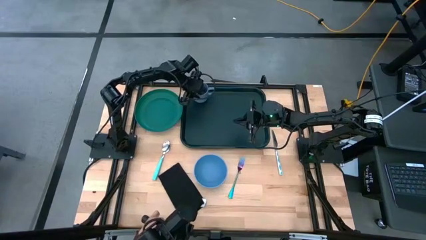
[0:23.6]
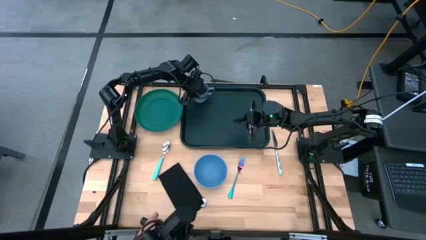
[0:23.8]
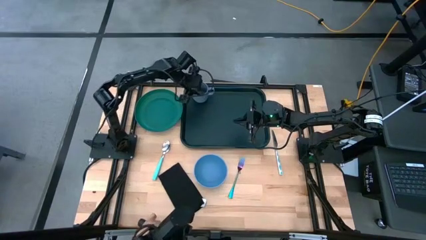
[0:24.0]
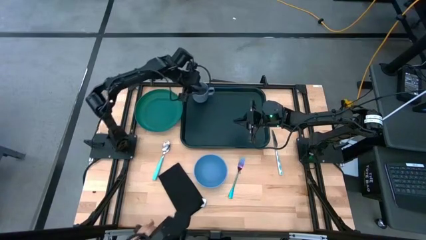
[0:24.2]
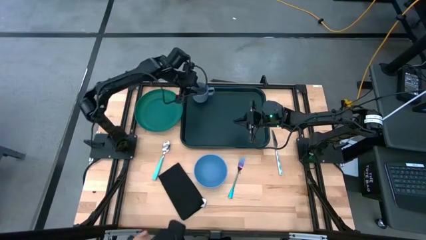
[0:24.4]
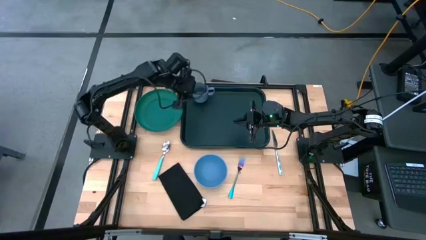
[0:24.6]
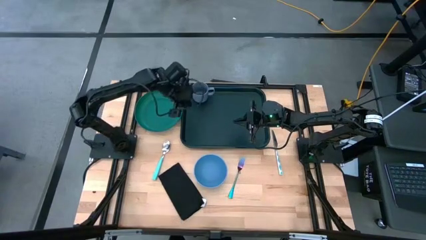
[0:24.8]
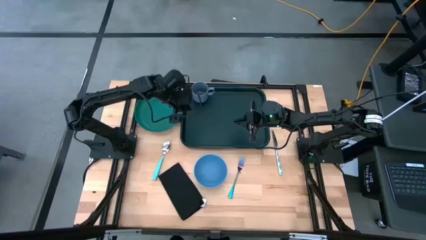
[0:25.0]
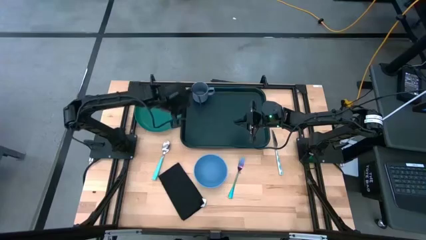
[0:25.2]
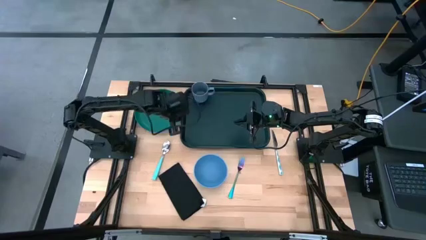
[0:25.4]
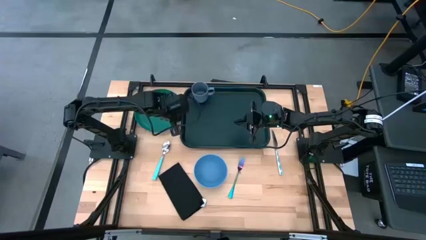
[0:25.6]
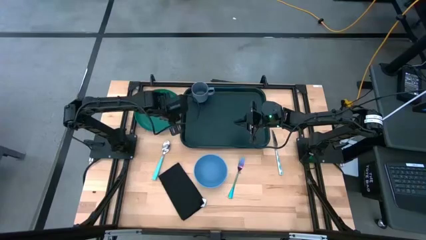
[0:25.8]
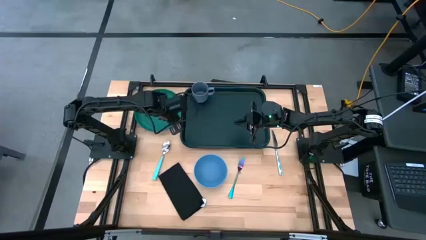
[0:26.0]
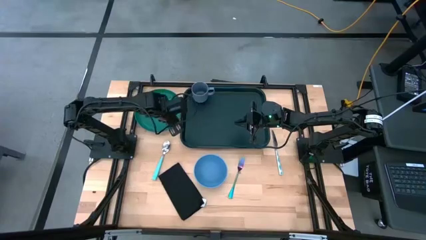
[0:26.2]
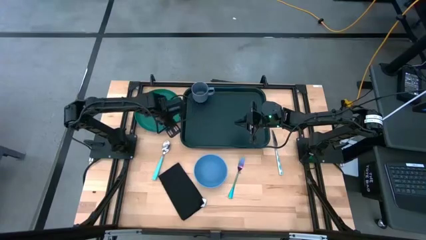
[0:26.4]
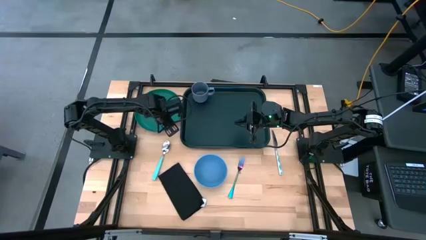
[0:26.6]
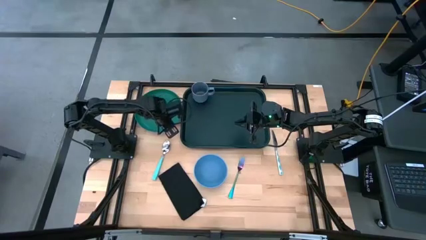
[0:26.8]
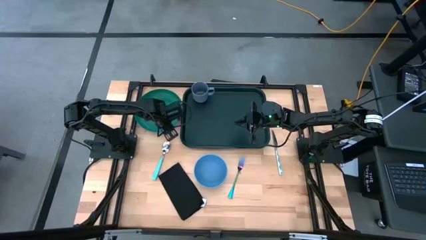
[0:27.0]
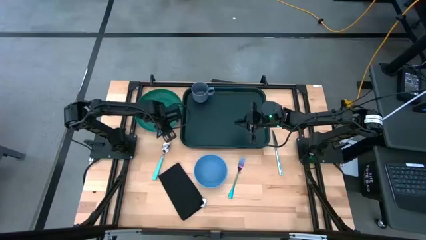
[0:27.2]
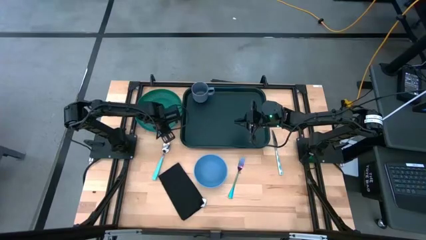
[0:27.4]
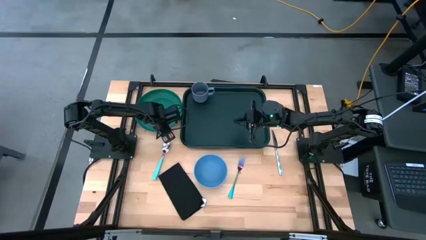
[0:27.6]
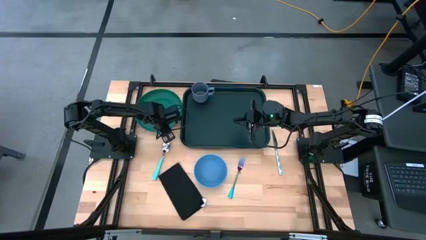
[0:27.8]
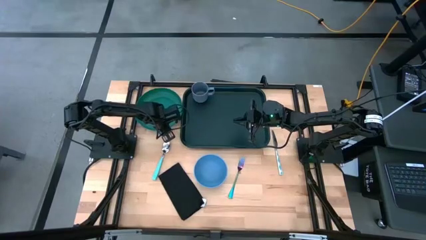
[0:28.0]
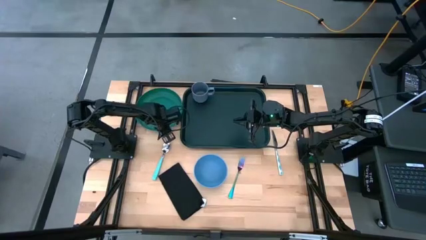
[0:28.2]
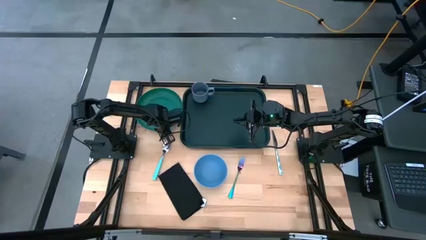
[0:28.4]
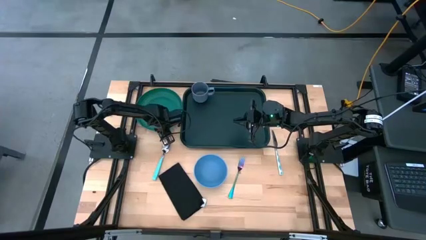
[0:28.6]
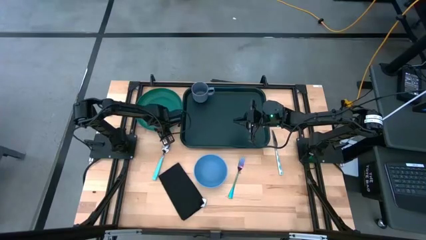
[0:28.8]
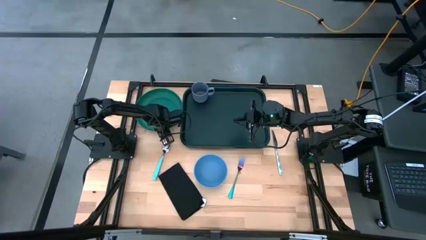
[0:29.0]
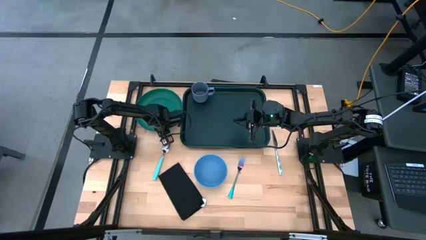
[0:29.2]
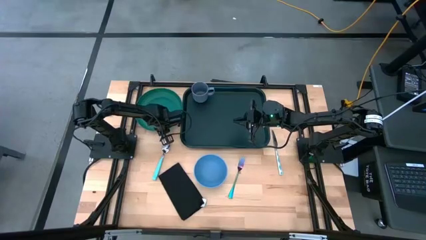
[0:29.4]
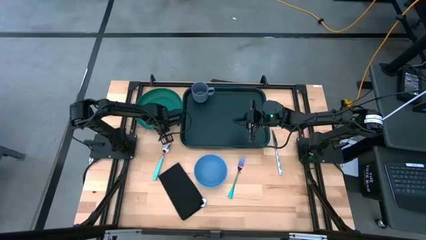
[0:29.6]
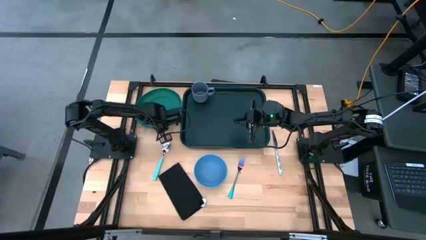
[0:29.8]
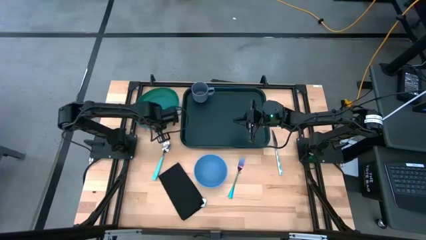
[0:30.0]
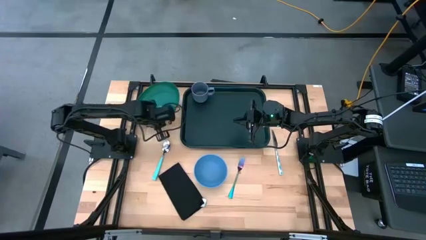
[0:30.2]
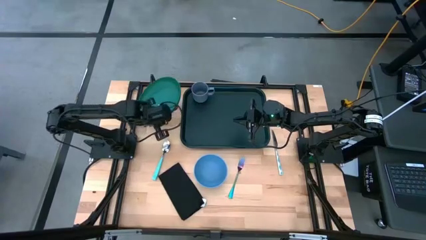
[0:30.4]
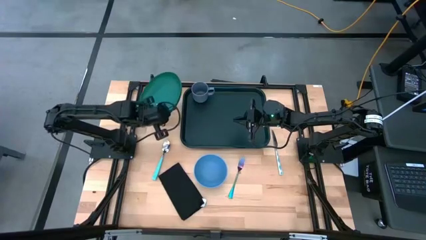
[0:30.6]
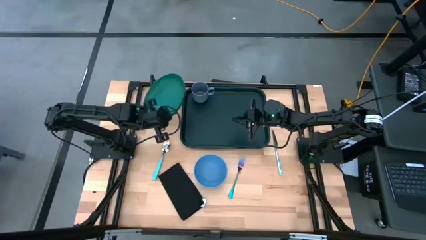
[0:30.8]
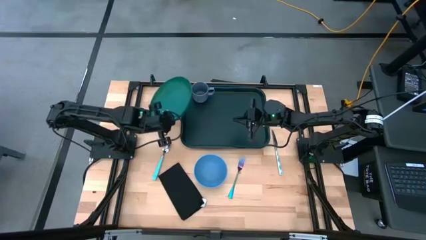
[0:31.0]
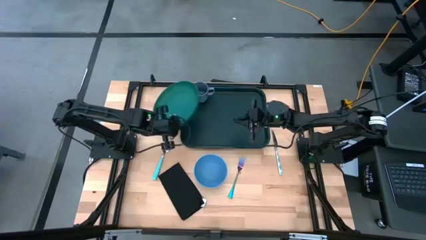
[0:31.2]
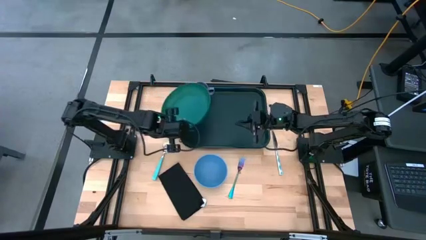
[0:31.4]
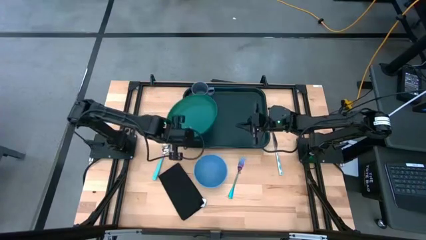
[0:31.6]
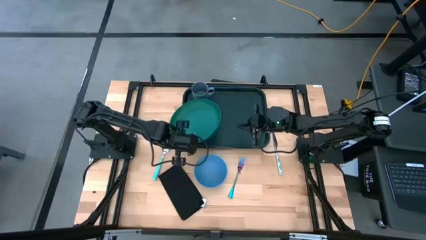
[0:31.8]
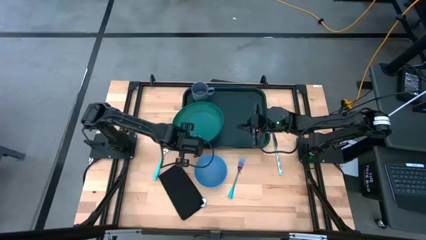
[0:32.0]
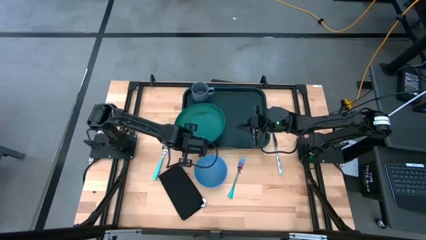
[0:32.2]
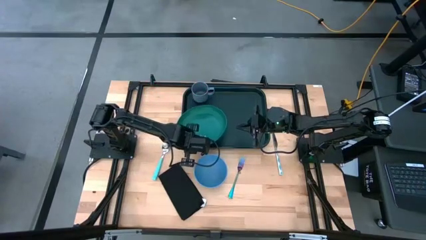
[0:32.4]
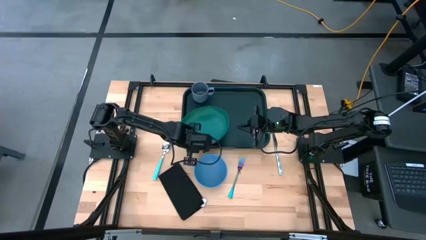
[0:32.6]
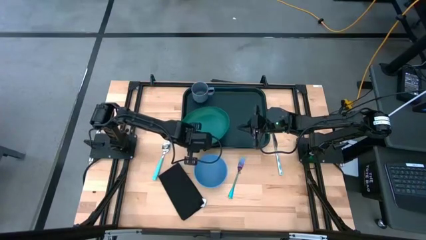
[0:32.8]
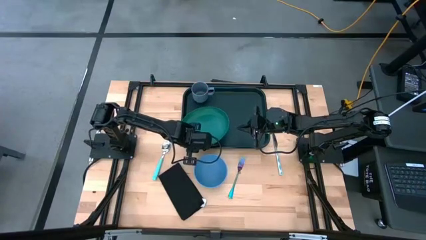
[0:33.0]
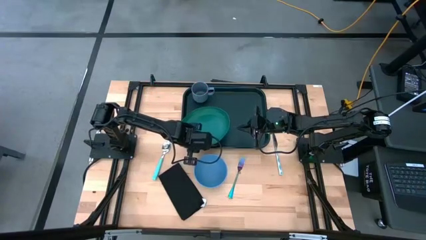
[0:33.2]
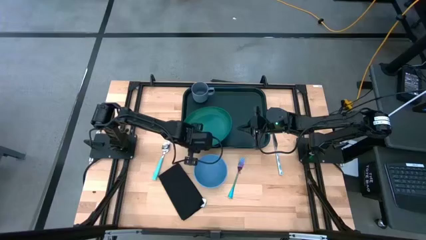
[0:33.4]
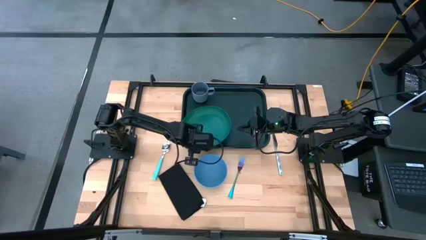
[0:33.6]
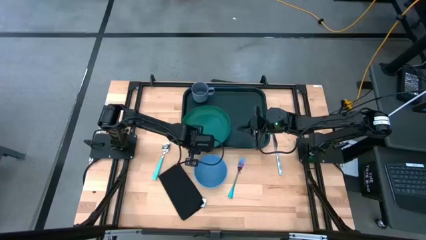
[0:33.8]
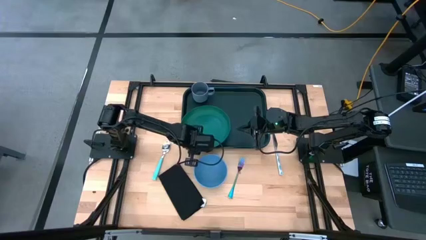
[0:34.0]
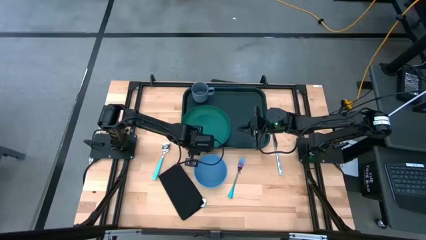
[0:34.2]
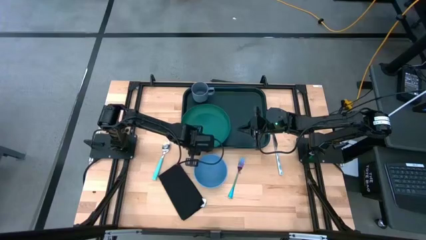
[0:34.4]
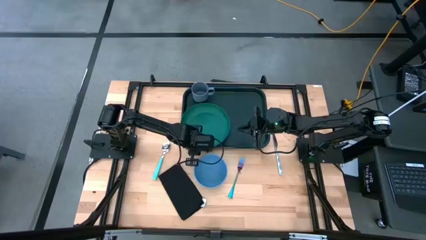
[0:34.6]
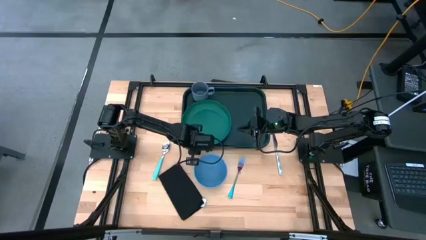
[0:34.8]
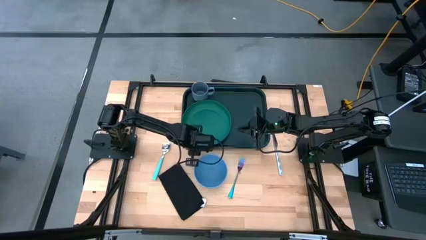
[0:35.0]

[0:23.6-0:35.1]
Task: Set up tray
Put the green plate under the gray mug on the dark green tray

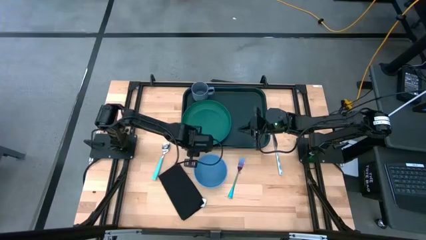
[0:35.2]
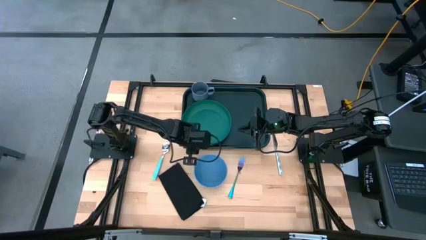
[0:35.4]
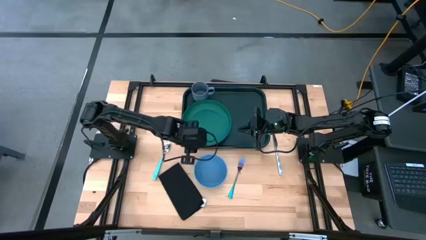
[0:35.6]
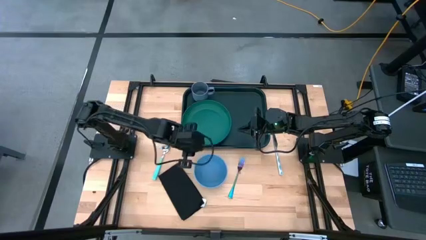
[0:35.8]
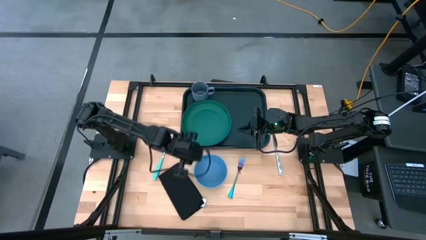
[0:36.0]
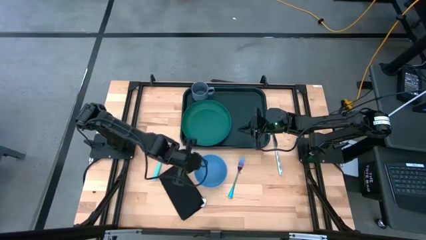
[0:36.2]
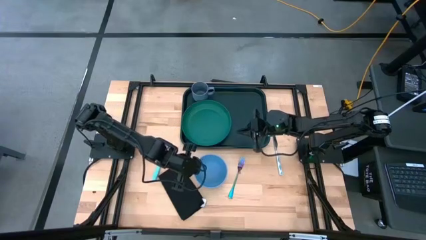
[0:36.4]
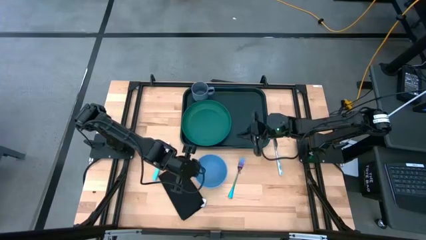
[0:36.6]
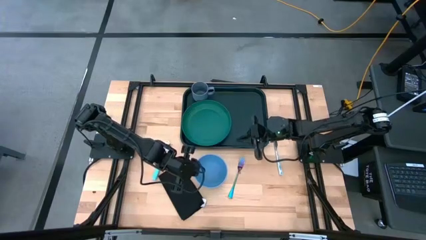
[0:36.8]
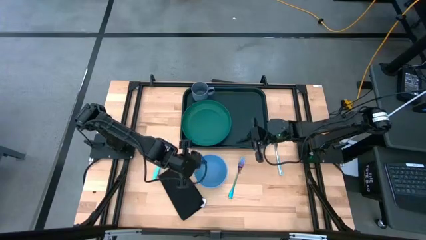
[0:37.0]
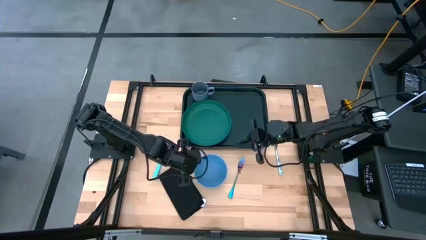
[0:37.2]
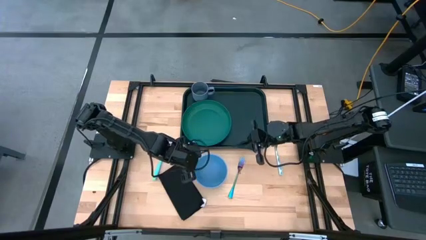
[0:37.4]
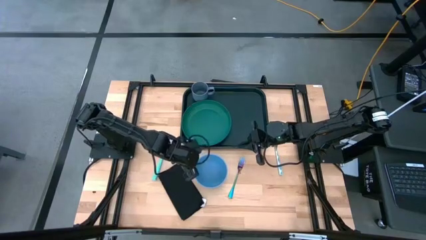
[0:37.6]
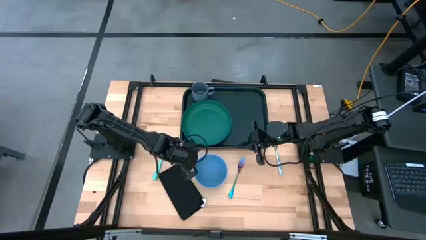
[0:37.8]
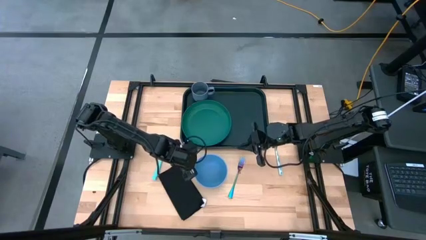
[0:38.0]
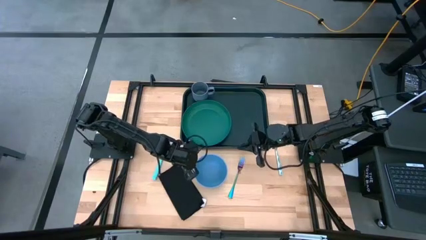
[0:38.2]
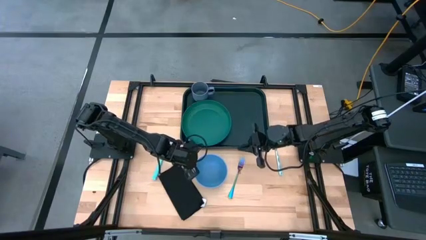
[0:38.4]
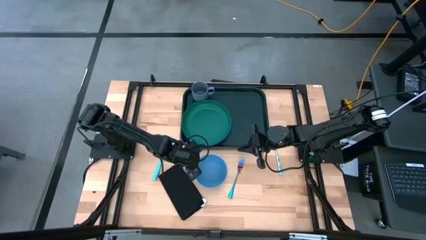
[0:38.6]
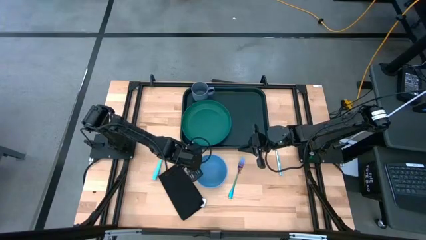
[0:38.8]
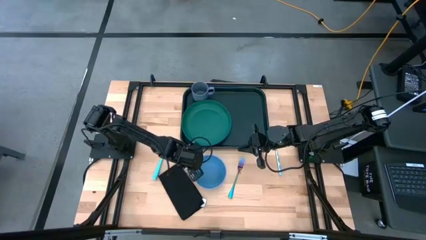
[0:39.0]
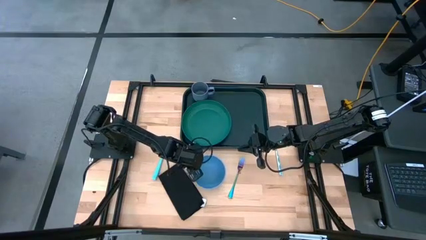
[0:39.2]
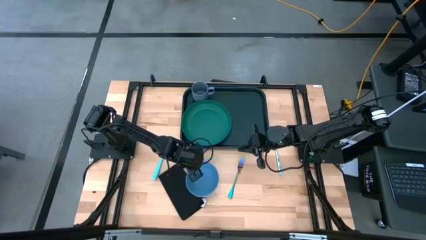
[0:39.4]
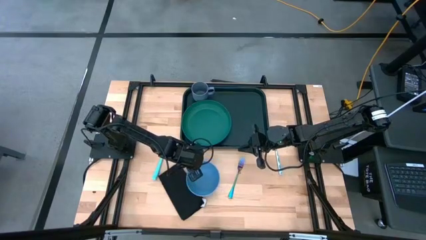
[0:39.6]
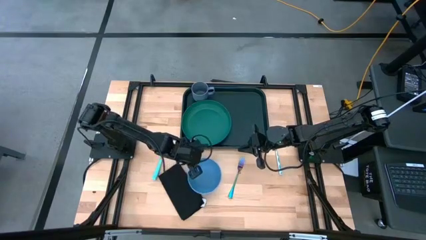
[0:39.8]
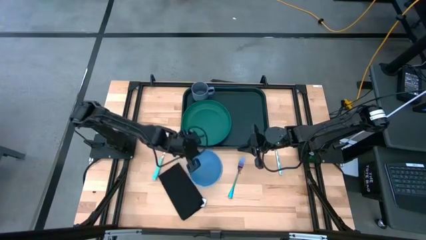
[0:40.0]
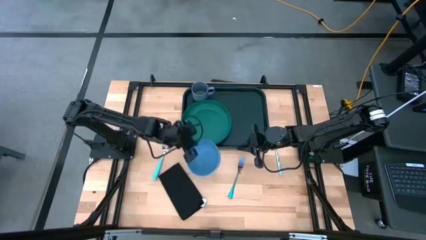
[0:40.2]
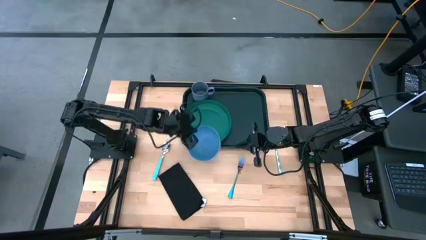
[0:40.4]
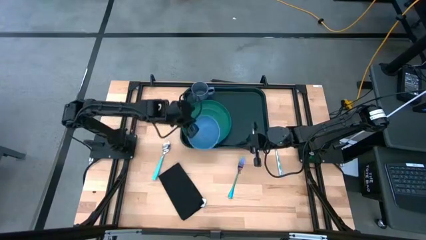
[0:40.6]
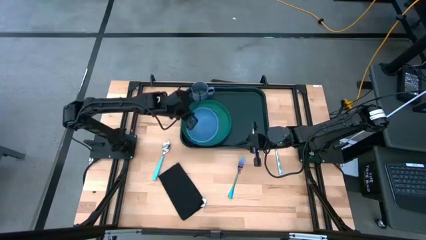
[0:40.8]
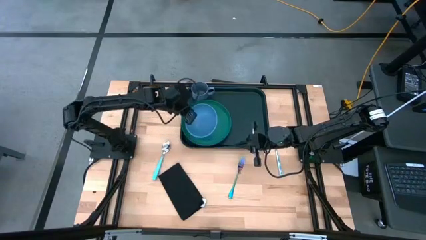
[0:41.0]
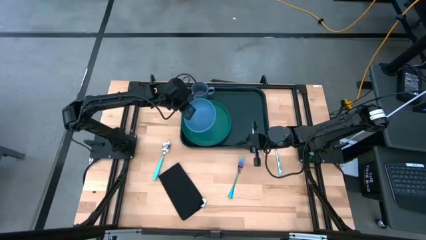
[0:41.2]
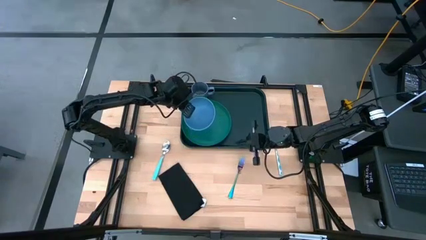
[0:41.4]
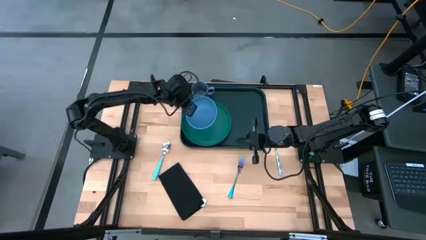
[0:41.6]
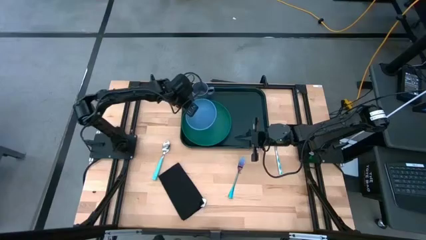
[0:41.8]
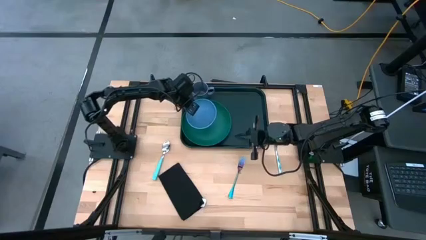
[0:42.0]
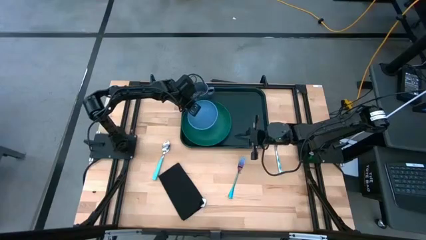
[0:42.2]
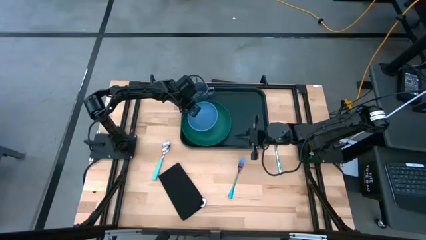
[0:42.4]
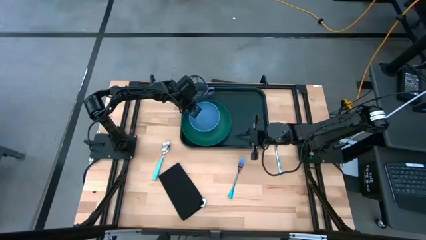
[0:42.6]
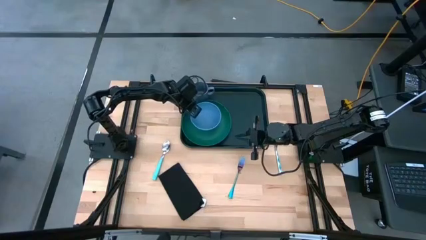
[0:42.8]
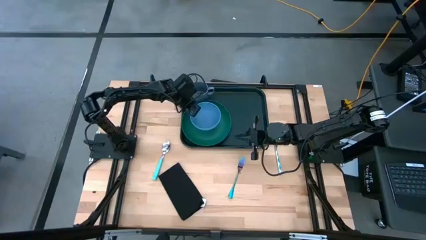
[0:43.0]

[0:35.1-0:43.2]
Put the blue bowl on the green plate
